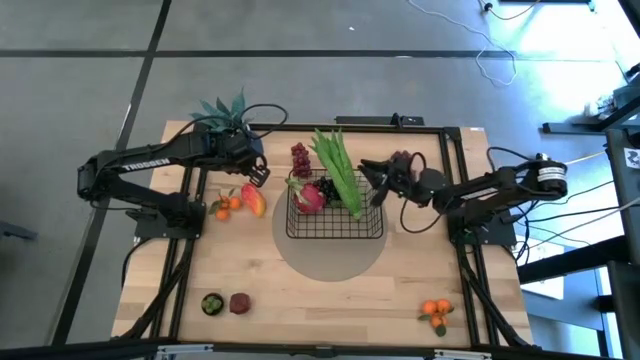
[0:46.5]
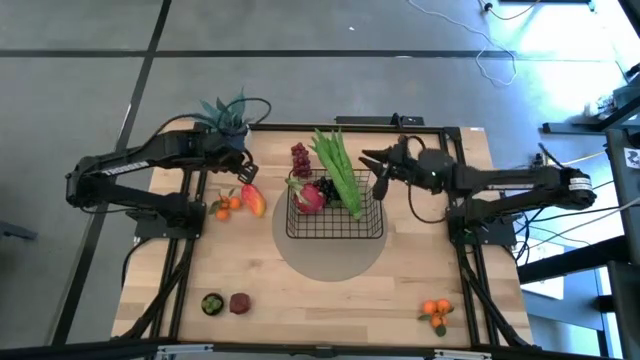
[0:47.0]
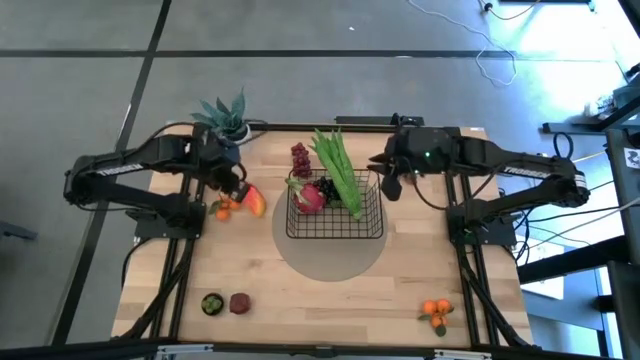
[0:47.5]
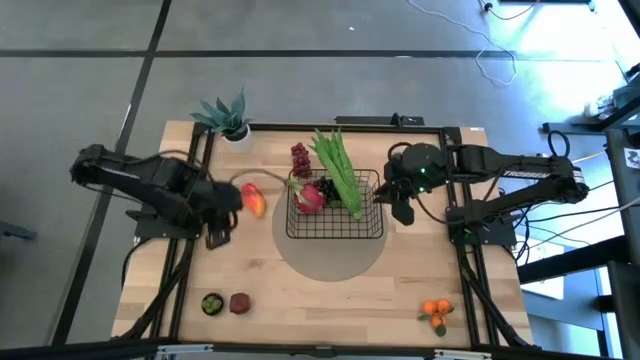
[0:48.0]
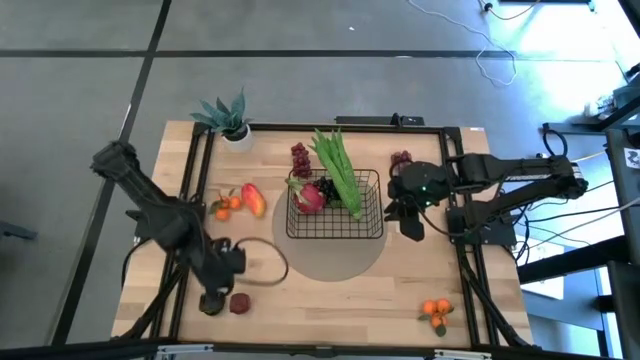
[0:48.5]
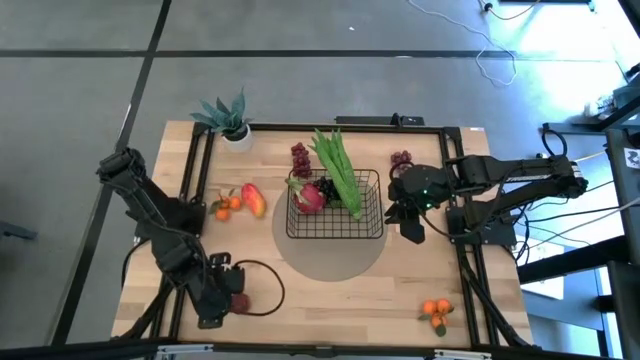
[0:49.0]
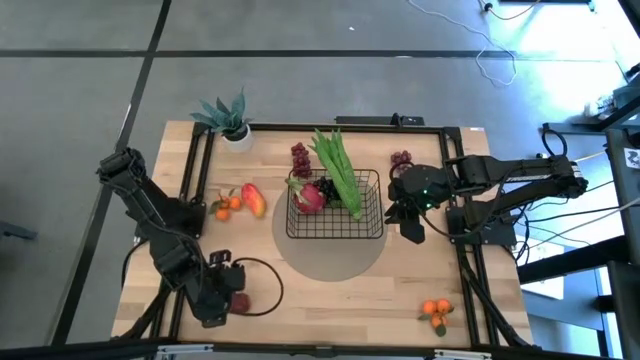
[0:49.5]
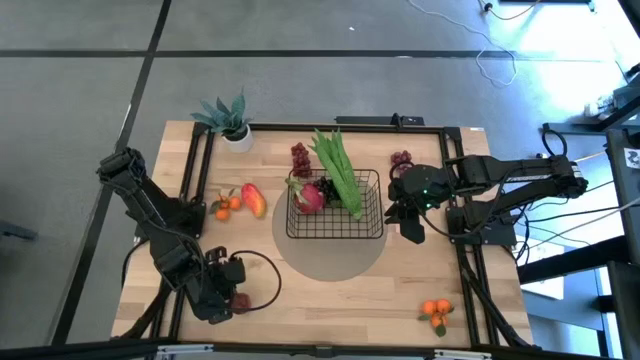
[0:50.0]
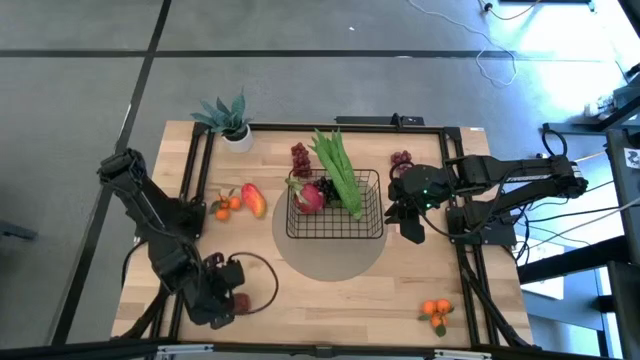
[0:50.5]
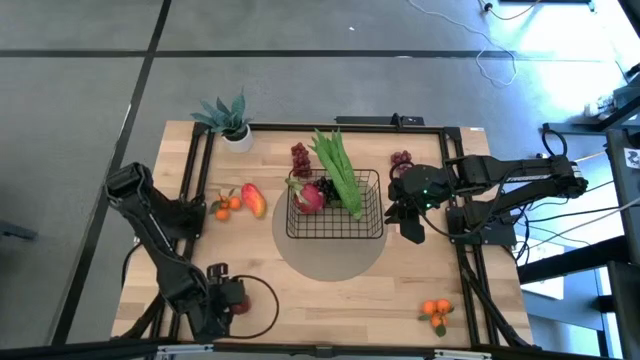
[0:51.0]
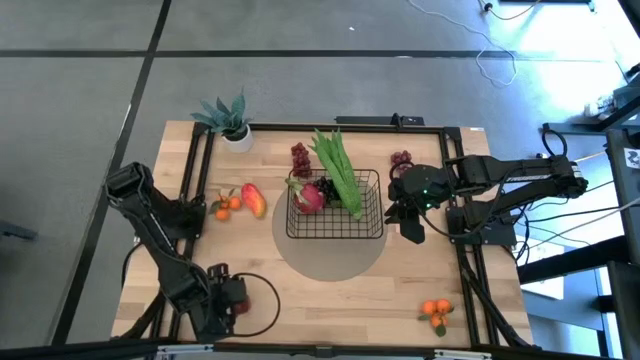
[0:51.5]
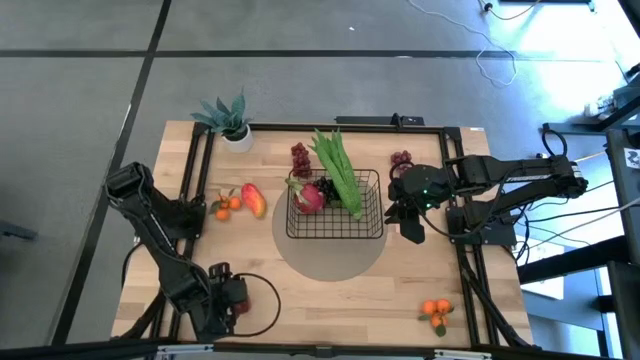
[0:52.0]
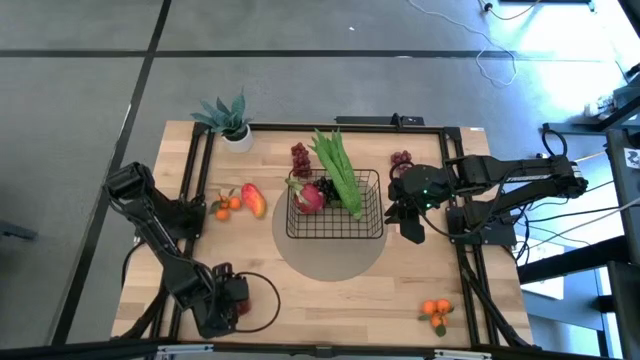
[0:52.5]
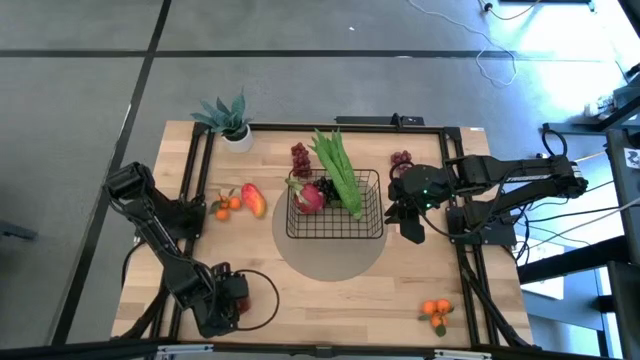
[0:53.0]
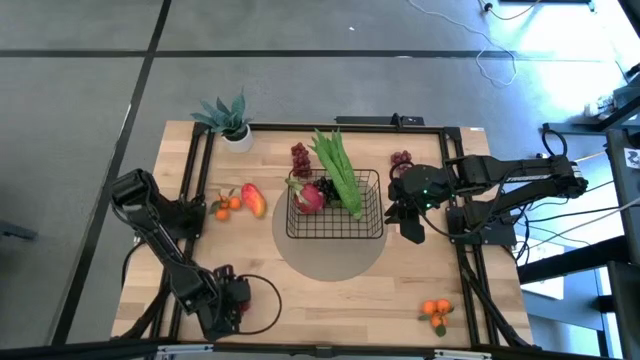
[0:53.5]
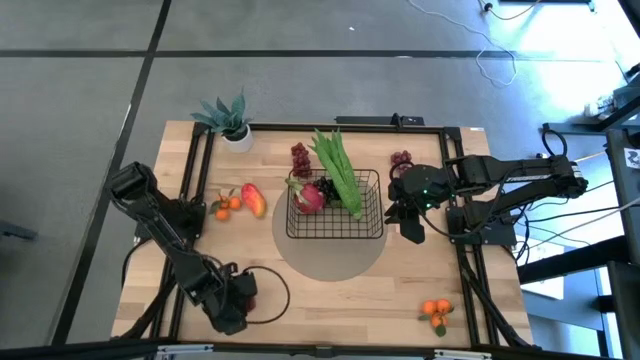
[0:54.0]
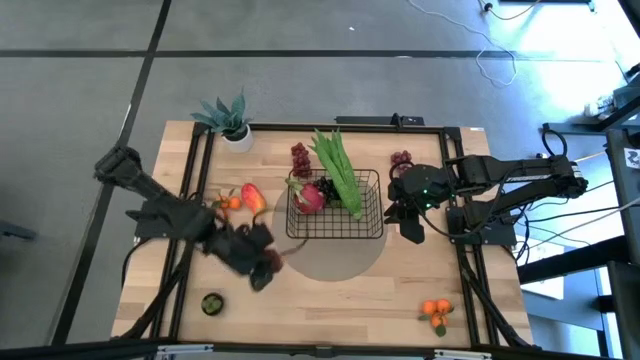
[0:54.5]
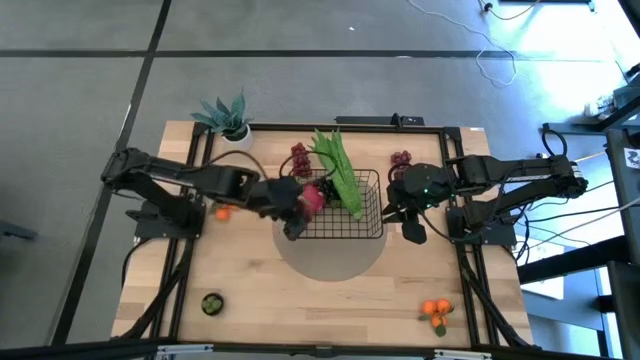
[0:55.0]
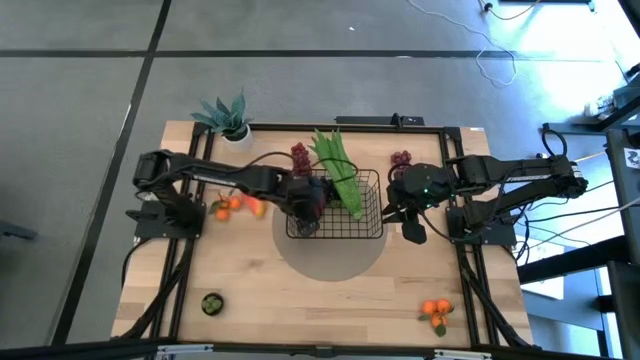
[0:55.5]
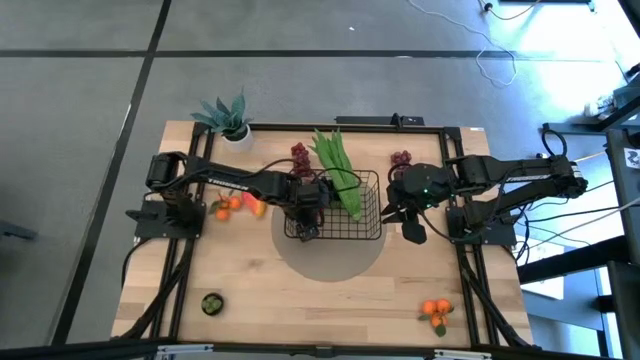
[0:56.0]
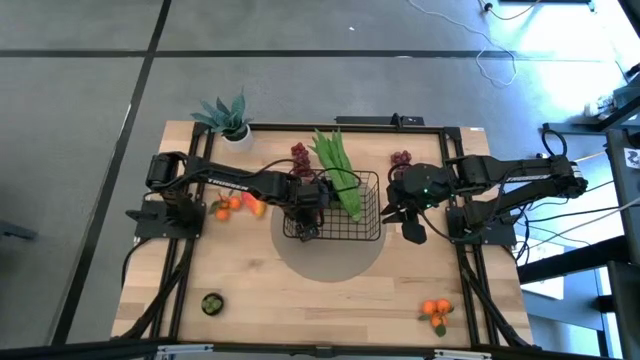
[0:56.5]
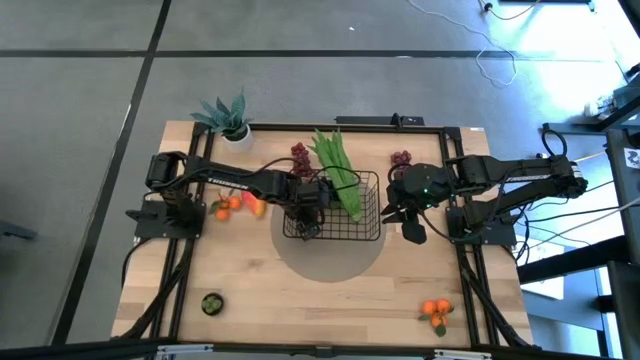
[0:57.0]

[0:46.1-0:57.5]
Task: Build produce basket
Put the red apple into the black wire basket

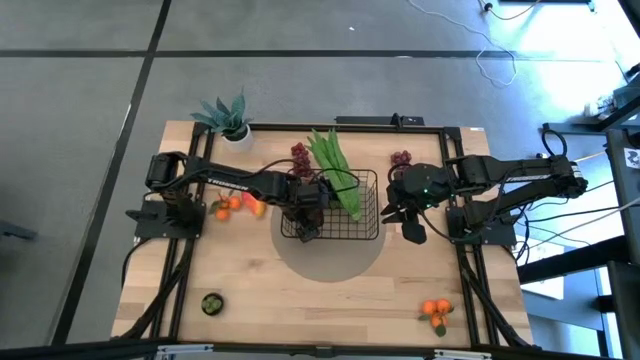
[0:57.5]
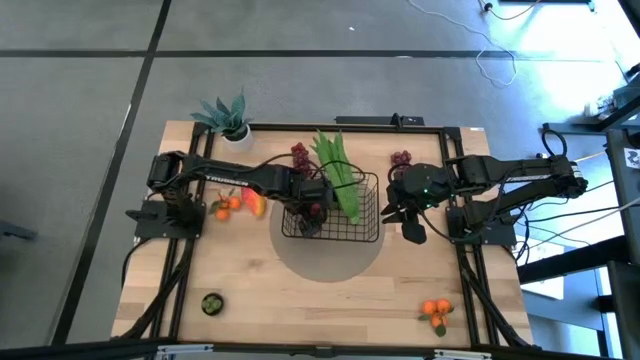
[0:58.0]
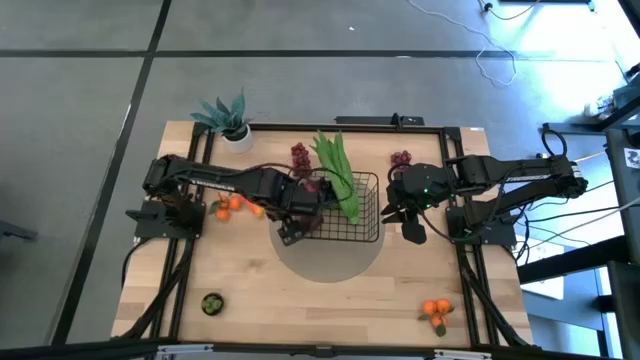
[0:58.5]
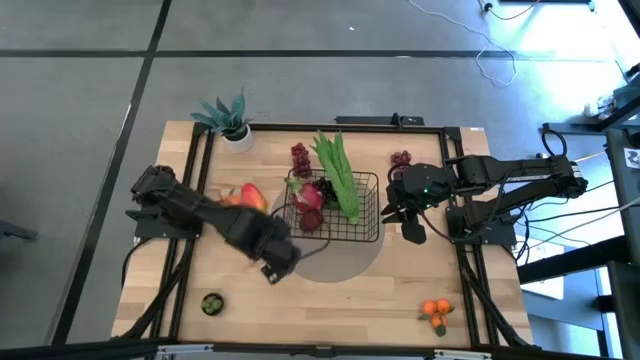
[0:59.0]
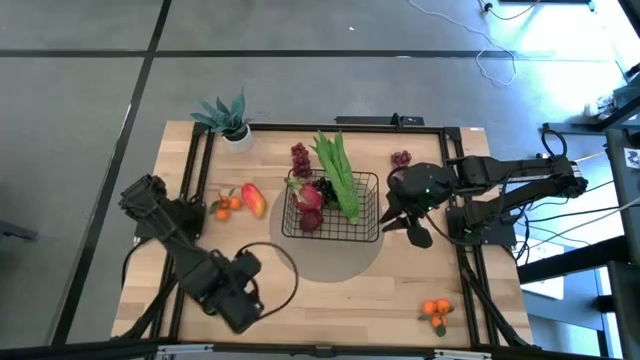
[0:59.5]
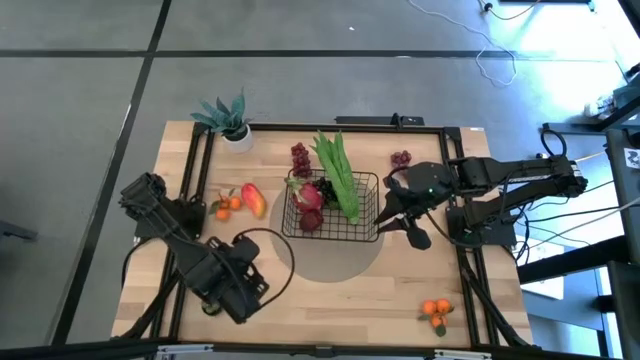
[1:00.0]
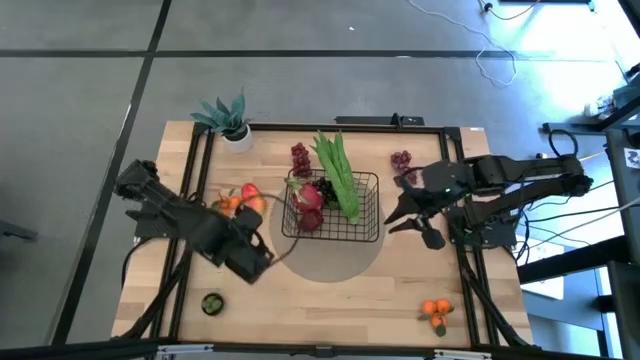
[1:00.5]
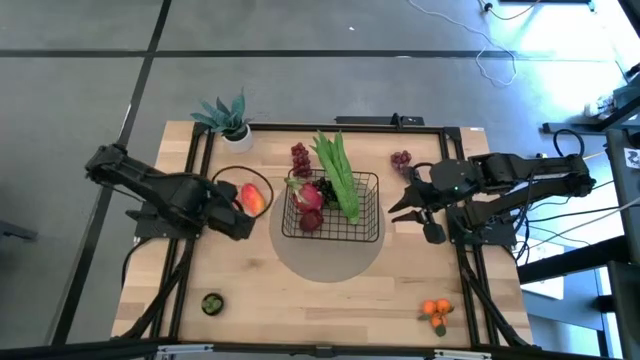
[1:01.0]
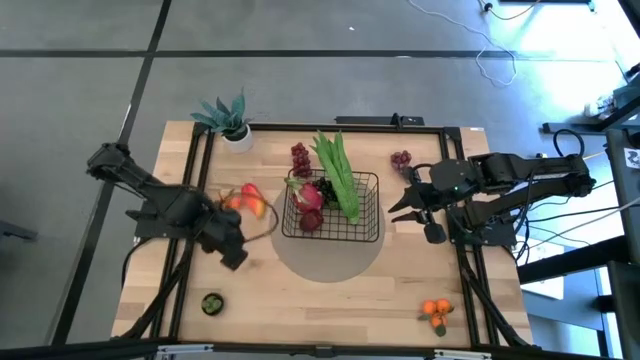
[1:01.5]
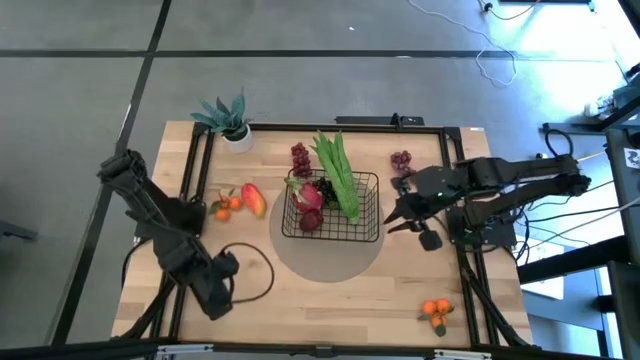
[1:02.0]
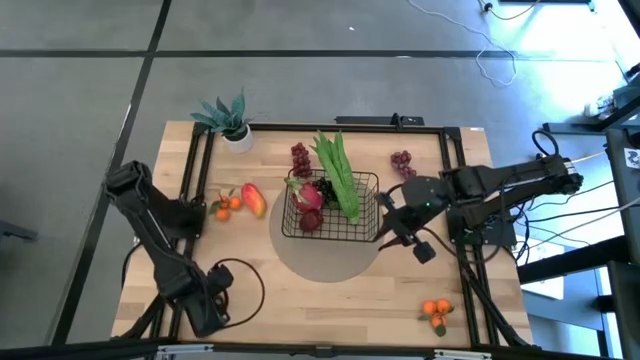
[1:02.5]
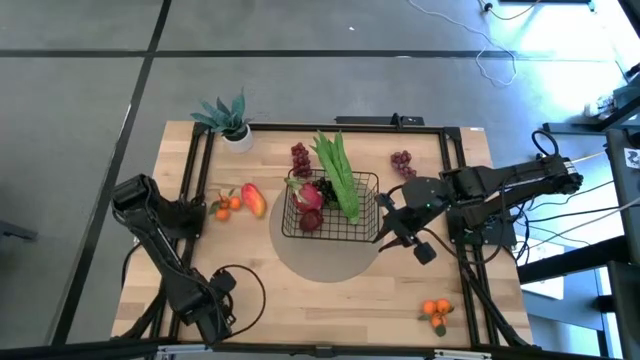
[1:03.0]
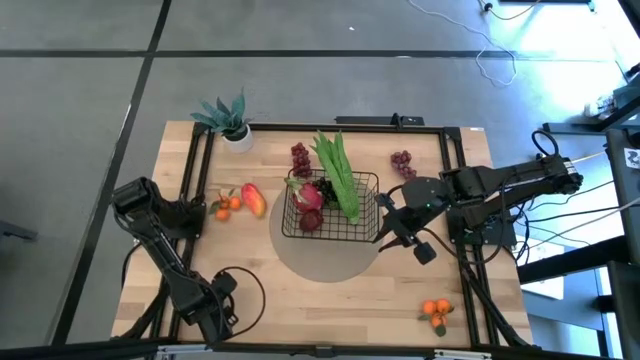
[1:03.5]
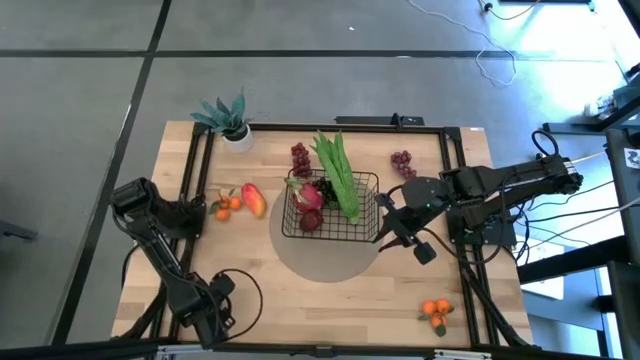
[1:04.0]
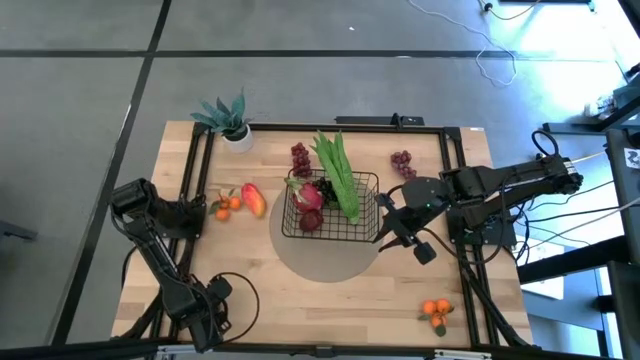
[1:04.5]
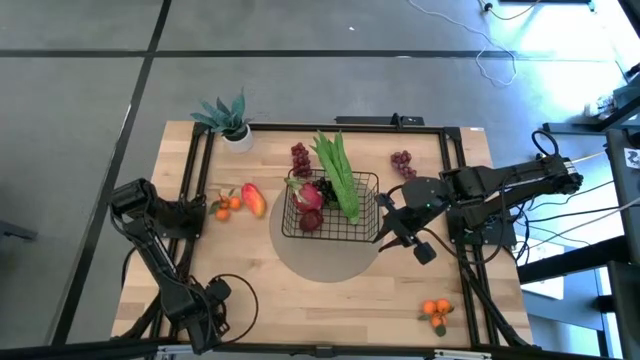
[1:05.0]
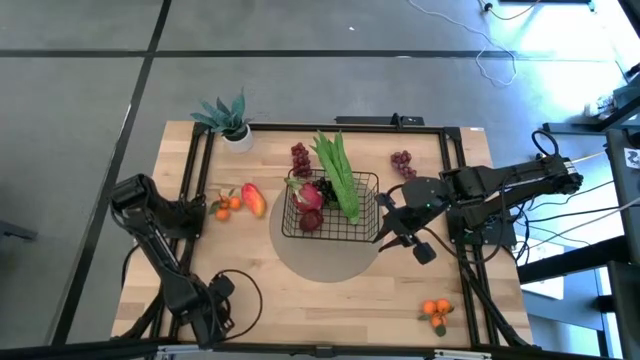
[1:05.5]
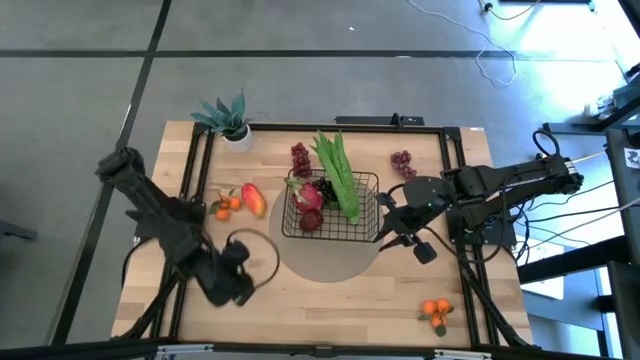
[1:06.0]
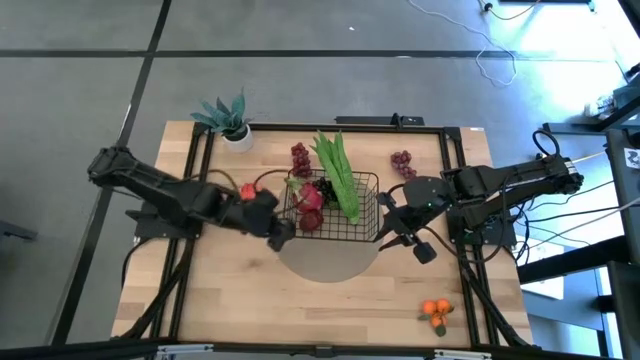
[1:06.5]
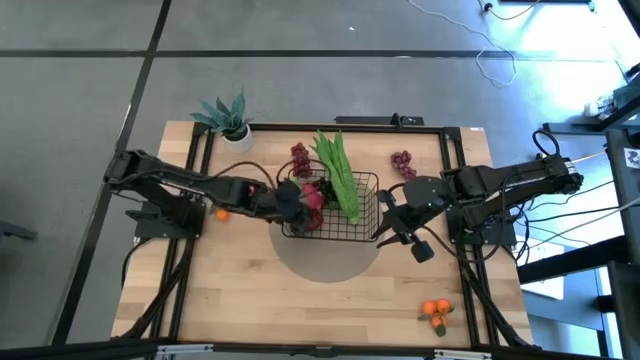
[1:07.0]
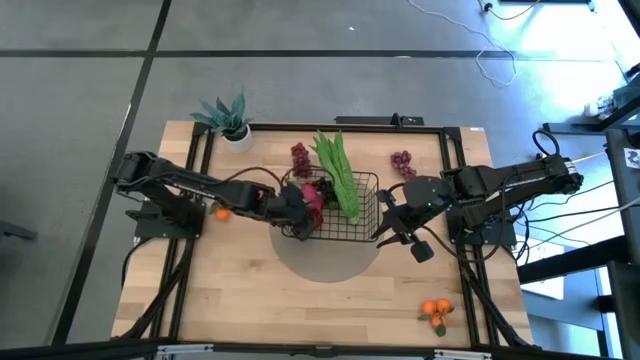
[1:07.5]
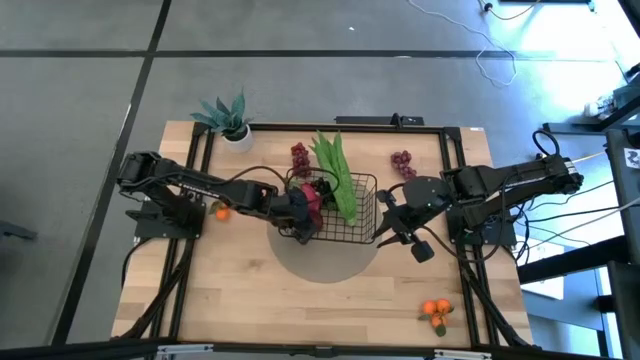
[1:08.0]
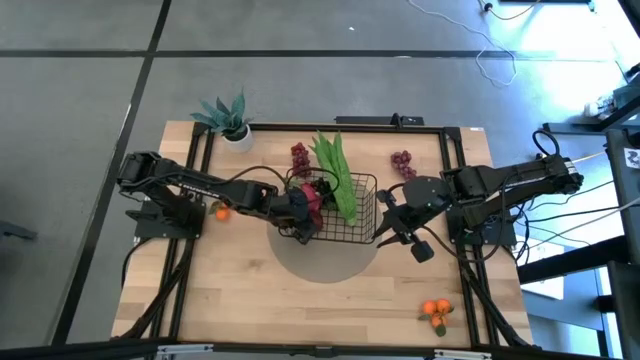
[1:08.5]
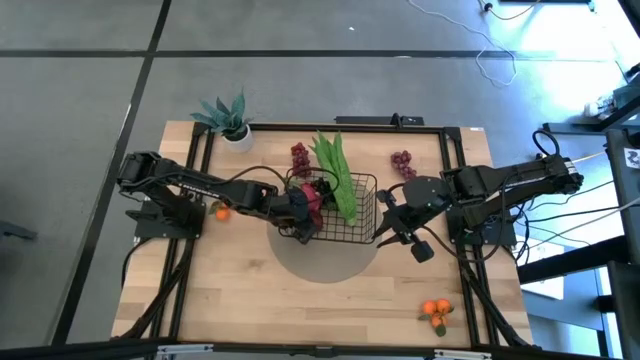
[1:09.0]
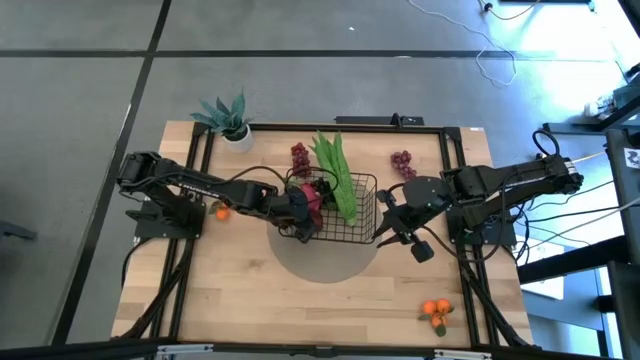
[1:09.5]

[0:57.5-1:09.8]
Put the violet mangosteen into the black wire basket
